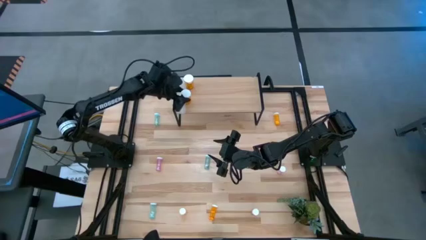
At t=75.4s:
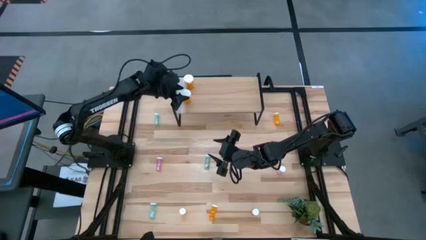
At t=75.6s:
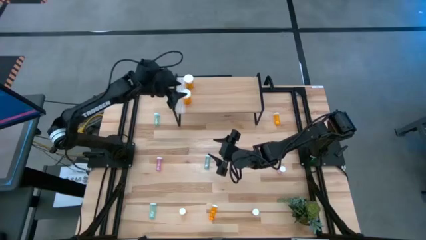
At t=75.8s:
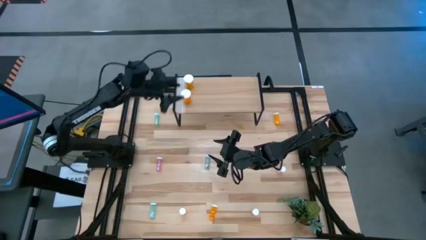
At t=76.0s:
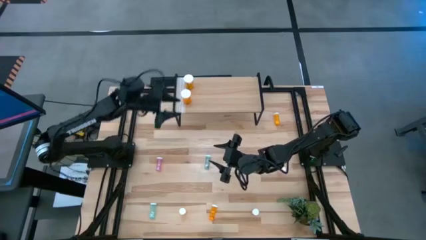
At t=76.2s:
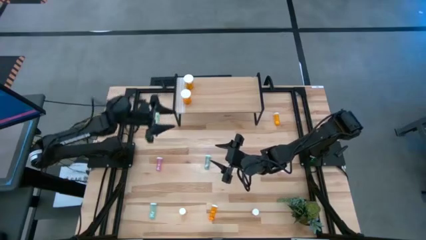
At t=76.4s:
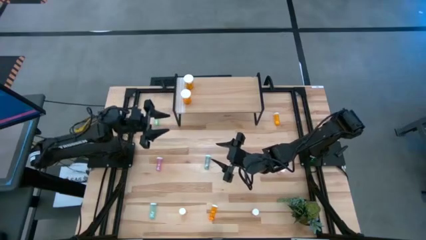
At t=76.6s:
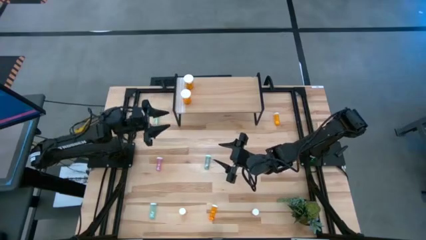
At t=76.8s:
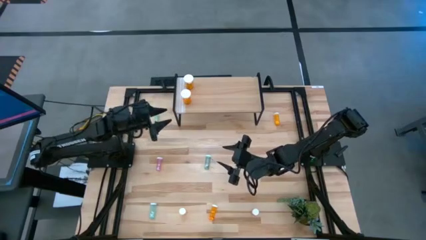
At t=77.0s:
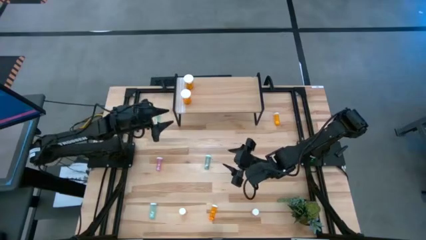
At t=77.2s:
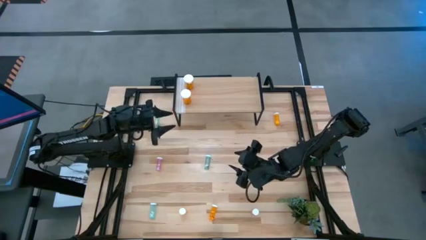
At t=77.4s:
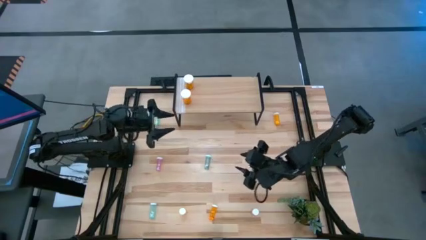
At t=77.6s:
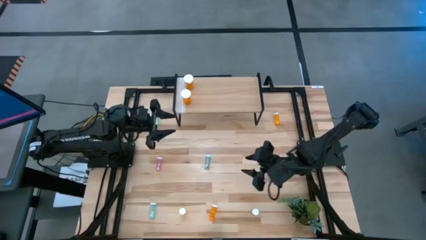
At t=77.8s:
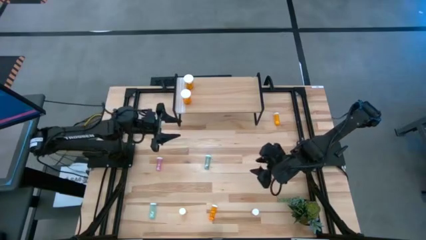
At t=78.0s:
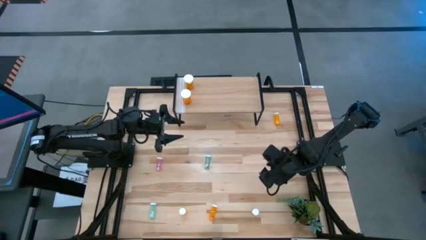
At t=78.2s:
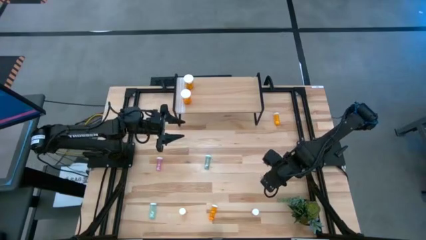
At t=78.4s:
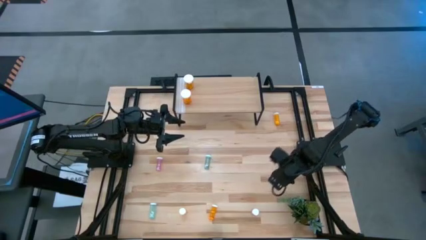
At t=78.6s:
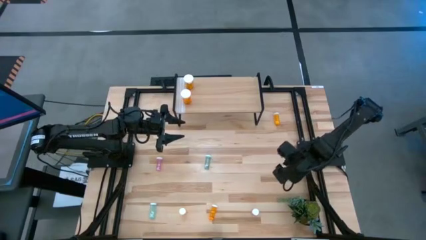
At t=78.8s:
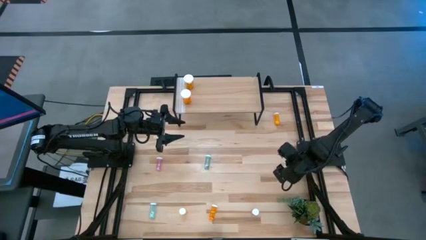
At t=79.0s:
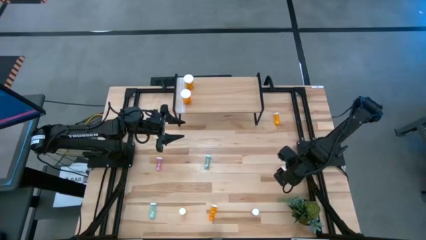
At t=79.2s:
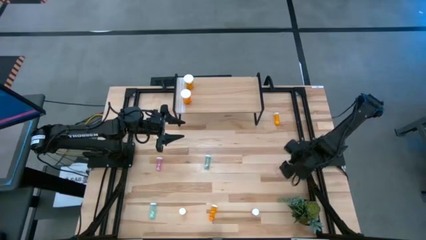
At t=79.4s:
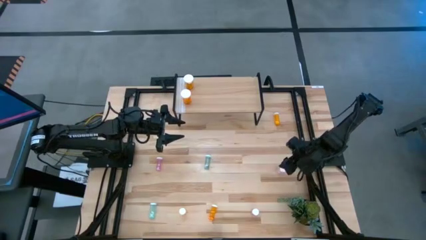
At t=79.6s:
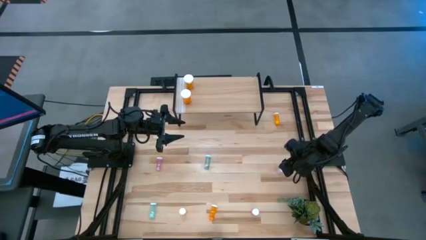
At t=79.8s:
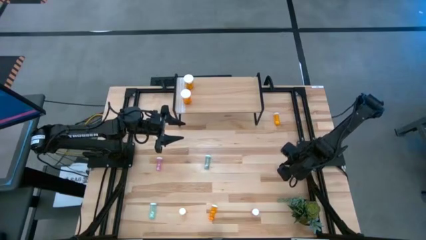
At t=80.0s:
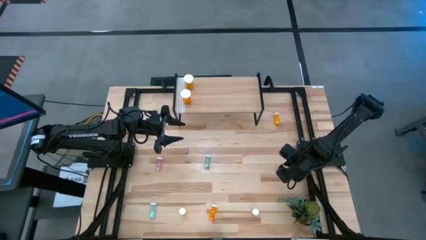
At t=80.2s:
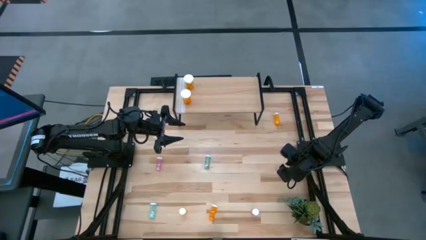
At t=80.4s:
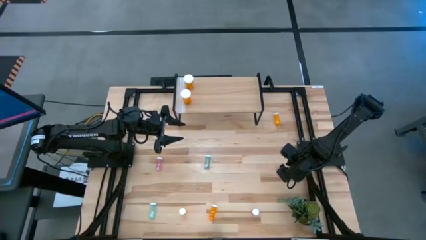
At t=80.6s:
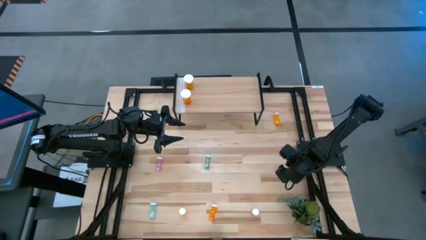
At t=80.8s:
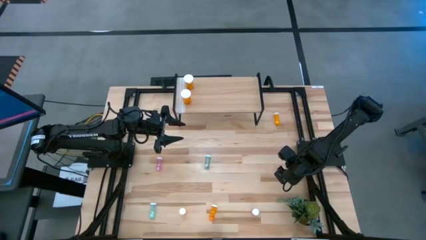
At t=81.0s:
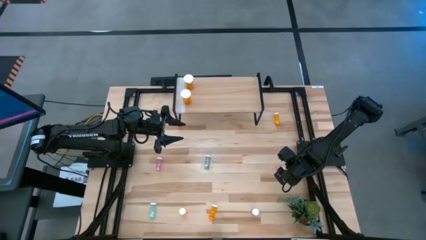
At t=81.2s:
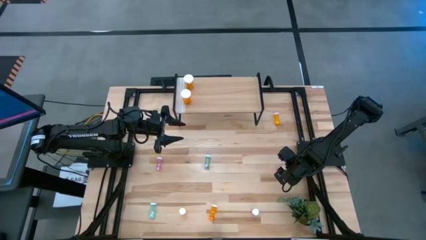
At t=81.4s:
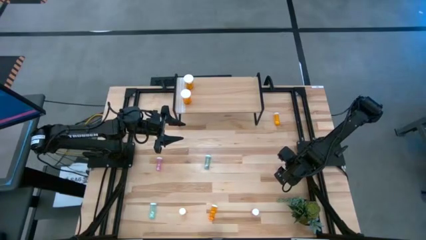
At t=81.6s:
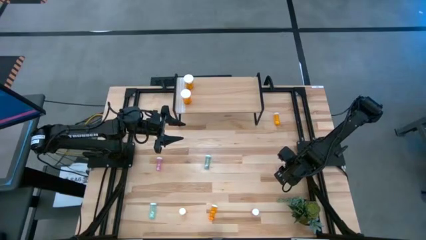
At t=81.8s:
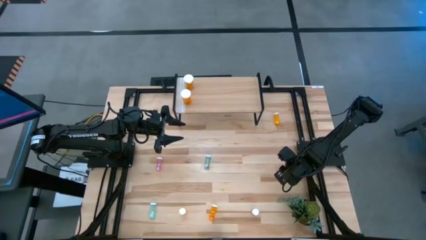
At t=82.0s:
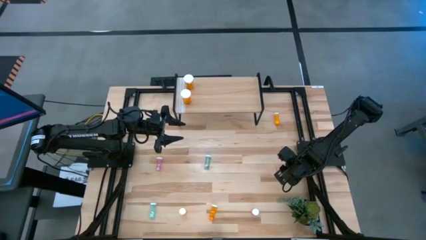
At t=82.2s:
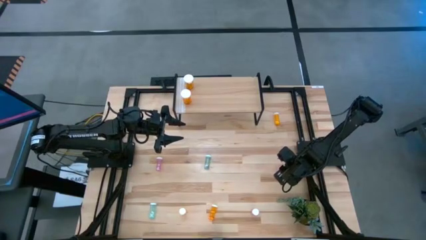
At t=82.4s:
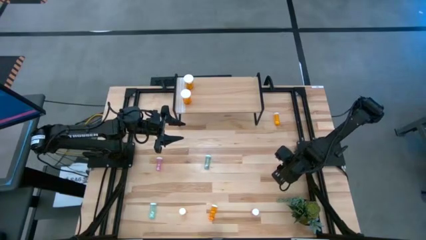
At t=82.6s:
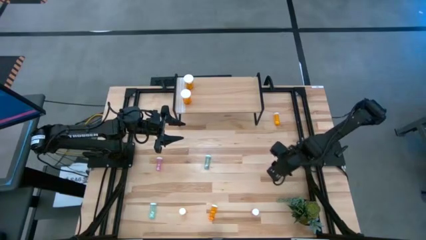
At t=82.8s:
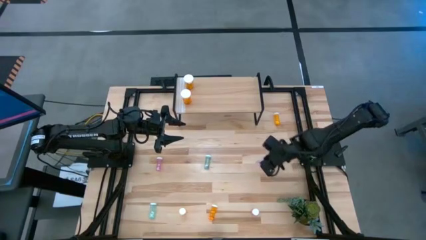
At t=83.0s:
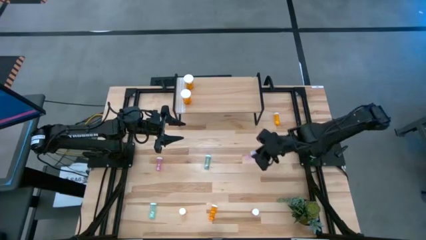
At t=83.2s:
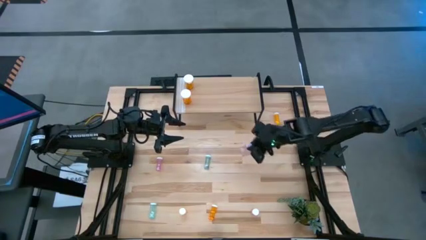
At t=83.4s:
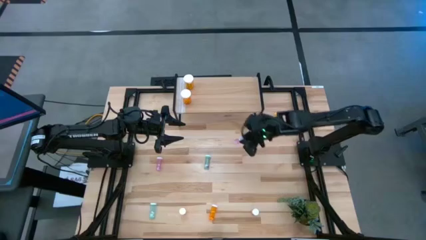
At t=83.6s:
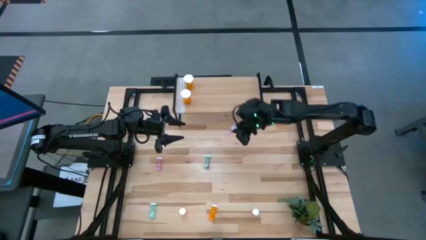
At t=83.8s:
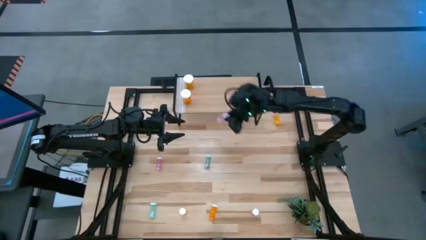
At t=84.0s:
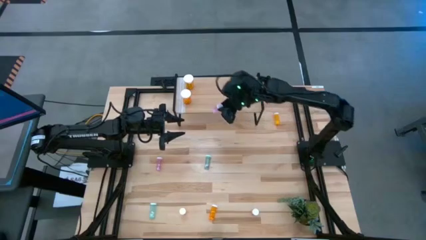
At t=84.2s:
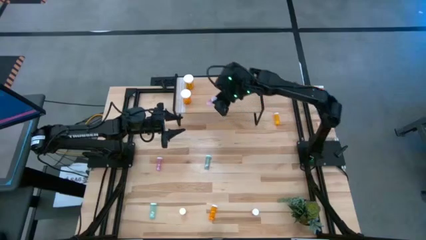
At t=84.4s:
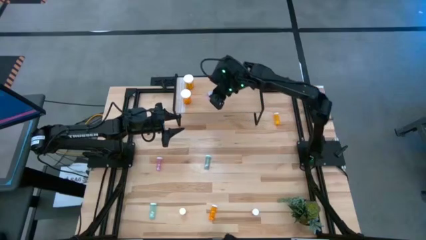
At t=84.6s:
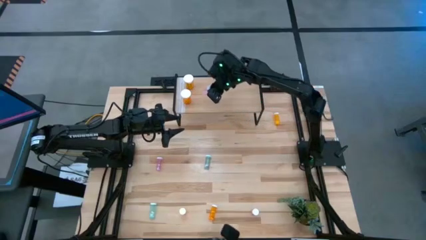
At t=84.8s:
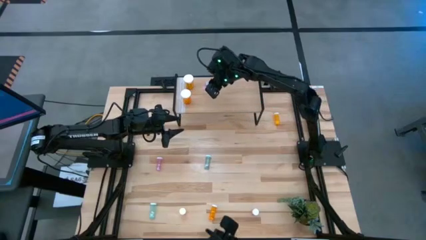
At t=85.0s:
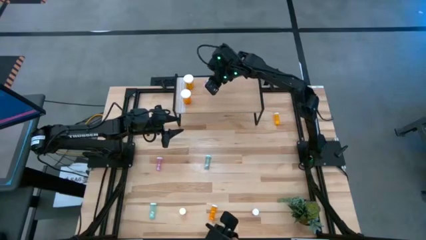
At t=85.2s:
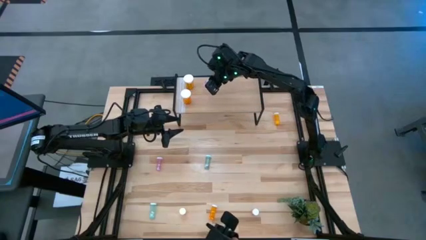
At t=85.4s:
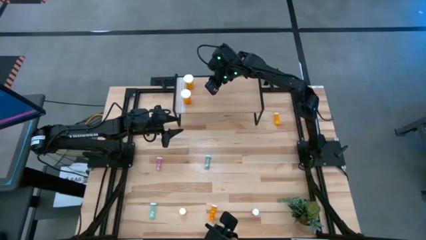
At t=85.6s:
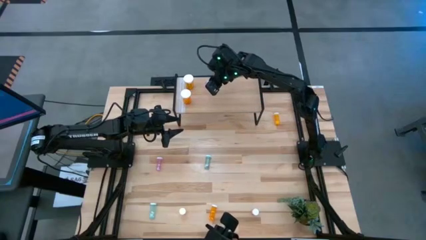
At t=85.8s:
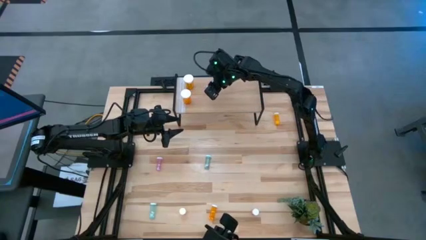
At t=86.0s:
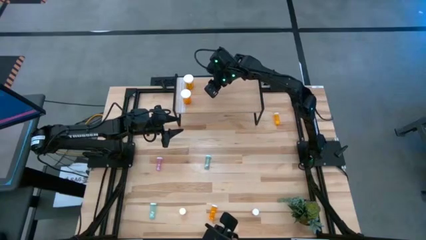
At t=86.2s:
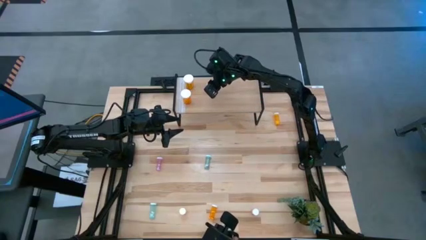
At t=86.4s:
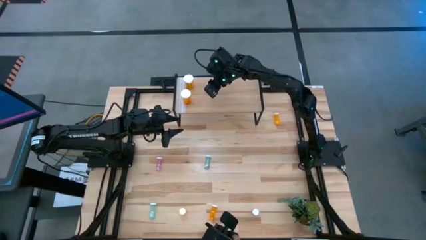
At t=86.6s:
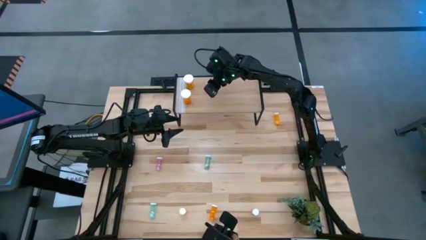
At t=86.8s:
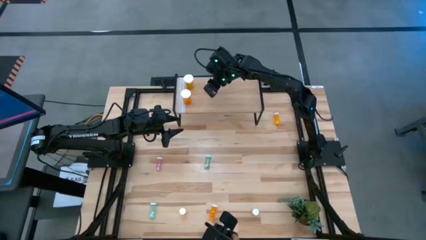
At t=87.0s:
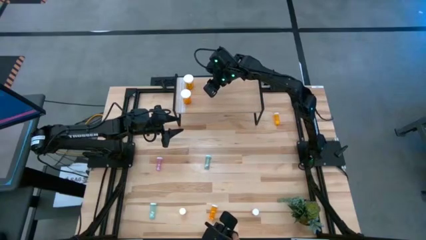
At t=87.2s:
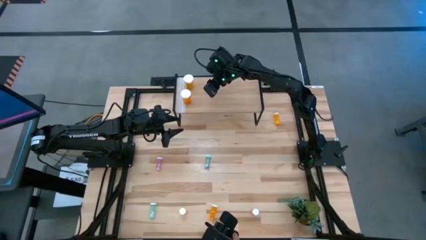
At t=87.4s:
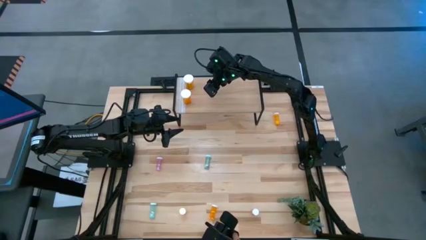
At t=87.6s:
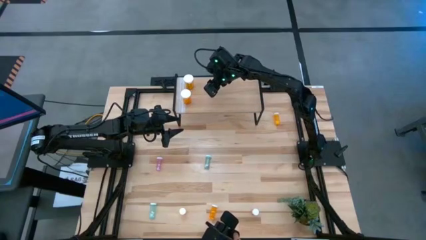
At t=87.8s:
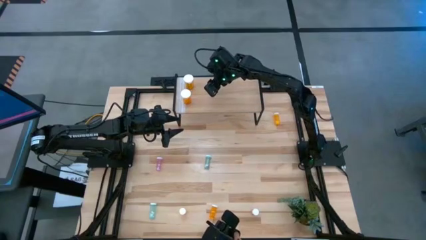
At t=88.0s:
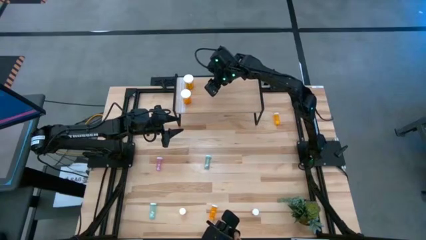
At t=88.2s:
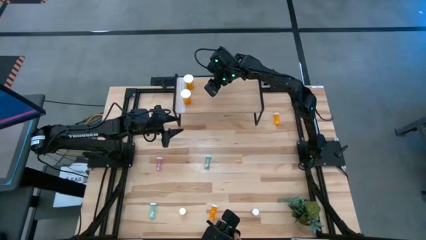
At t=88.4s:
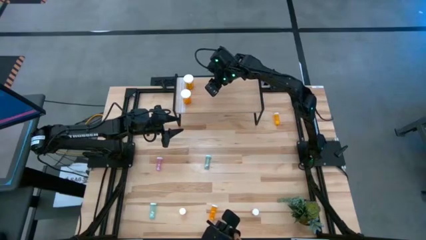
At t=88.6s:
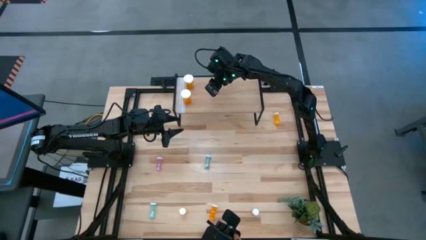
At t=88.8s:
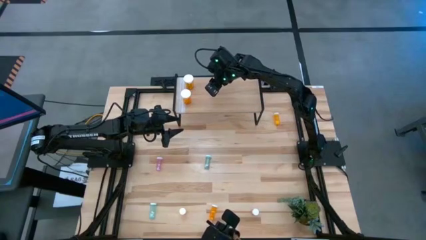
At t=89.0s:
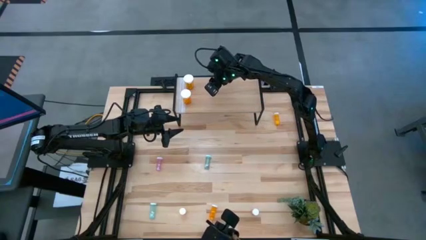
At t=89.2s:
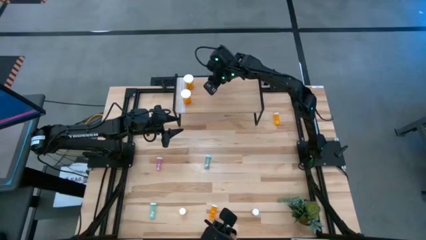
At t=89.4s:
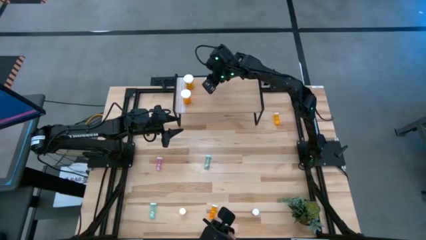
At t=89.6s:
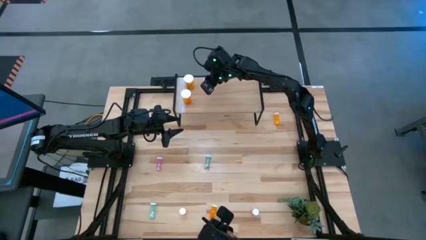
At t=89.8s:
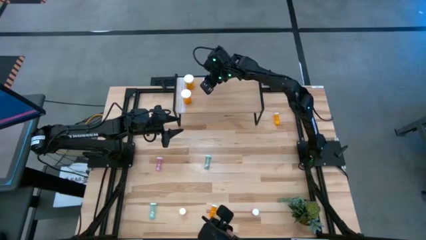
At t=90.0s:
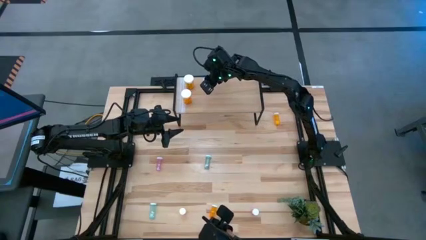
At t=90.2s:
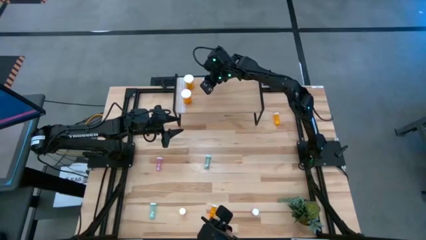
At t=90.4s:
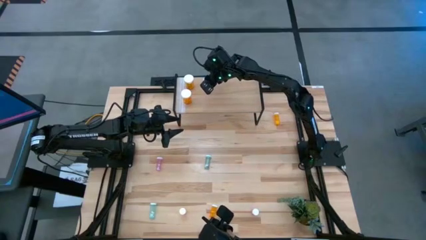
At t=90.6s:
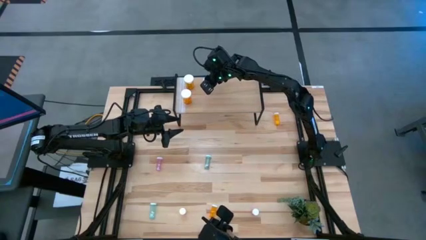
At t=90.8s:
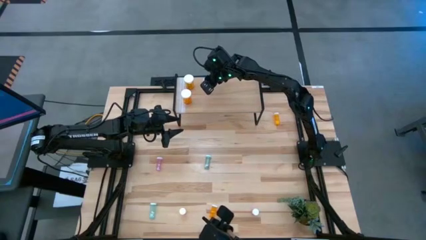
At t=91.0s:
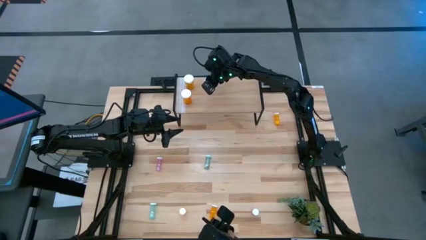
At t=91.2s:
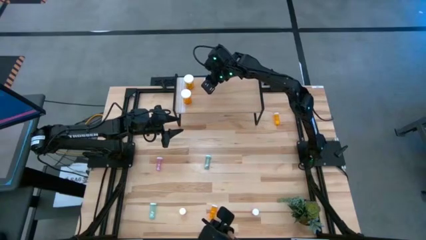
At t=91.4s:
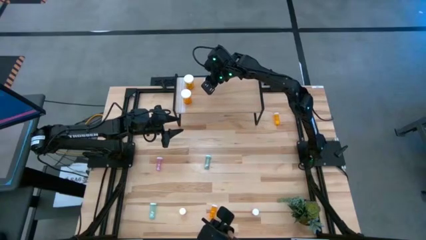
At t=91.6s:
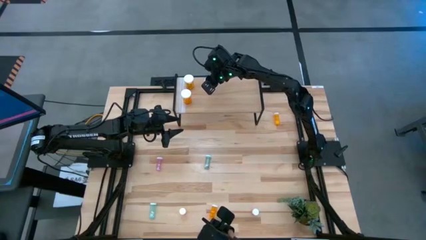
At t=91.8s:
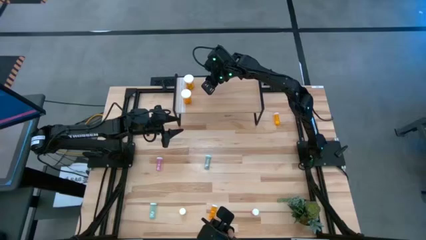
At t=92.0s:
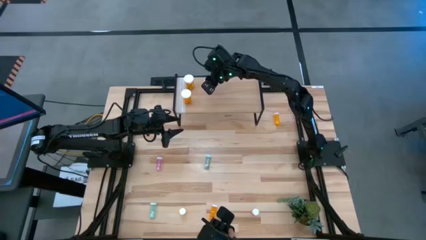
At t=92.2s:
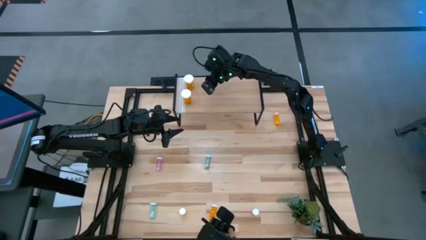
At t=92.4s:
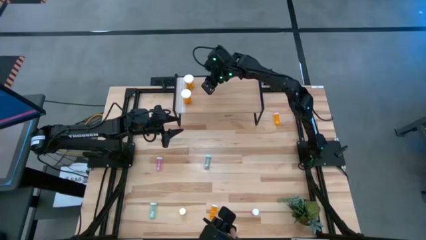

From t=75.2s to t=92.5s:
Task: Pick and place medicine bottles onto shelf by color
Put the top right small pink pill bottle on the shelf
